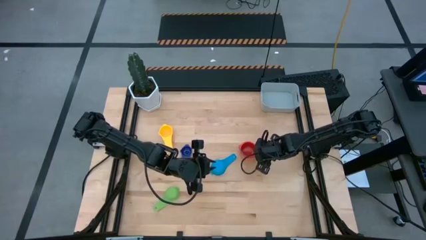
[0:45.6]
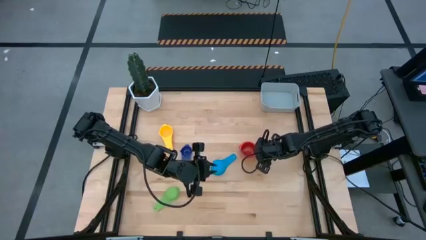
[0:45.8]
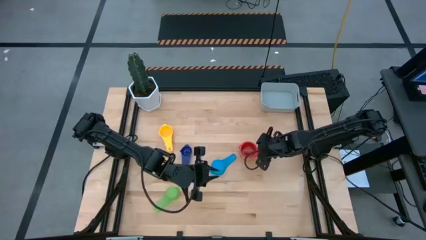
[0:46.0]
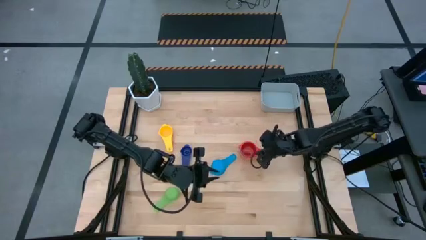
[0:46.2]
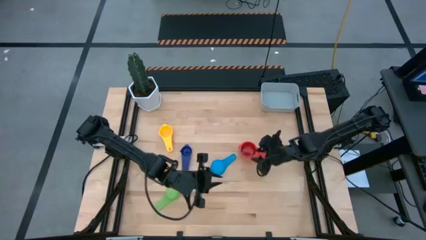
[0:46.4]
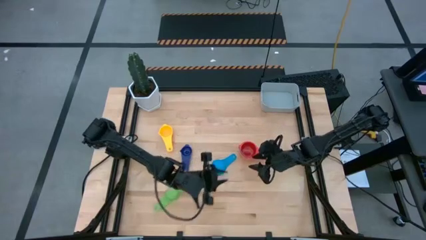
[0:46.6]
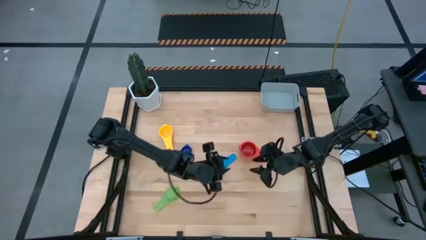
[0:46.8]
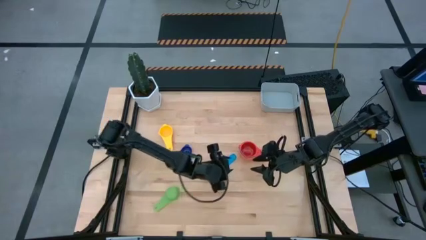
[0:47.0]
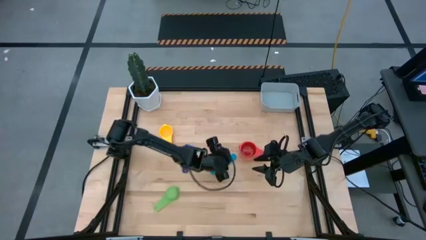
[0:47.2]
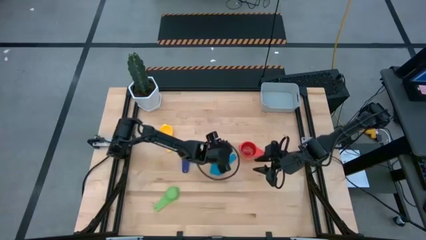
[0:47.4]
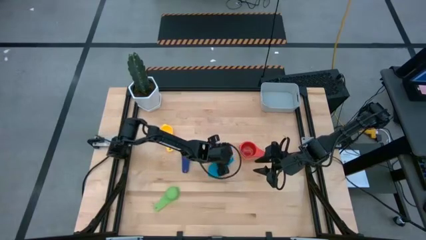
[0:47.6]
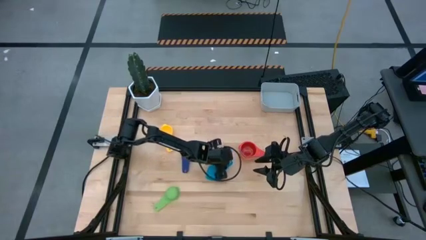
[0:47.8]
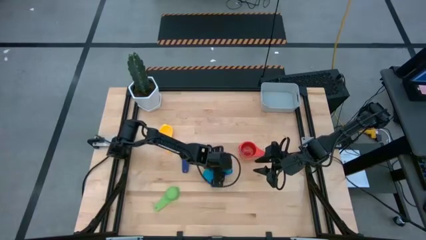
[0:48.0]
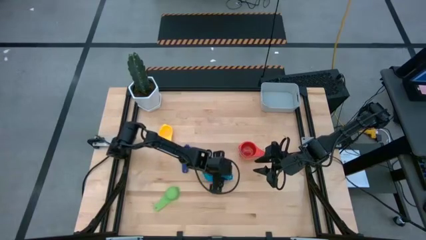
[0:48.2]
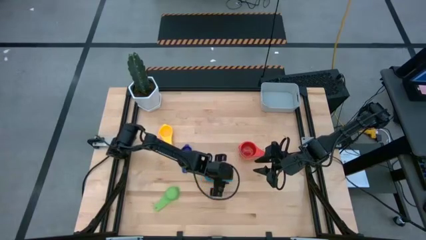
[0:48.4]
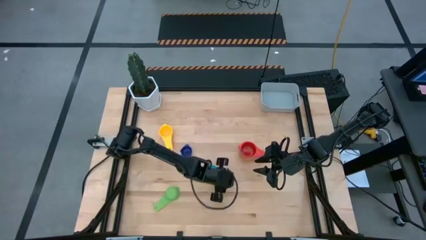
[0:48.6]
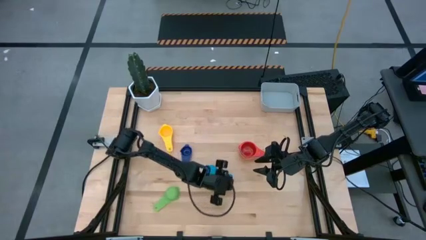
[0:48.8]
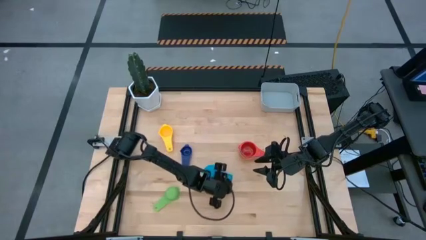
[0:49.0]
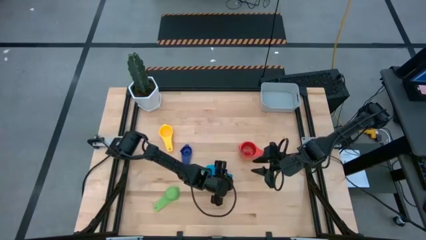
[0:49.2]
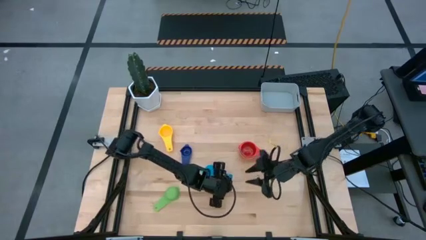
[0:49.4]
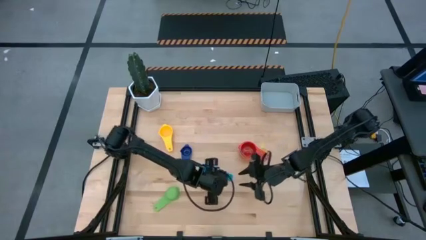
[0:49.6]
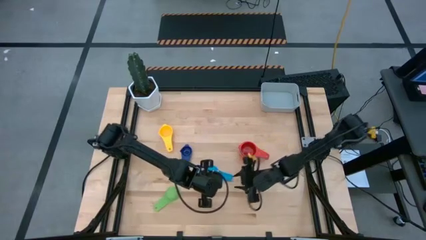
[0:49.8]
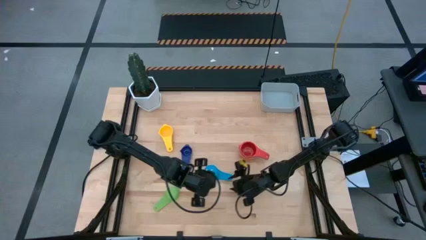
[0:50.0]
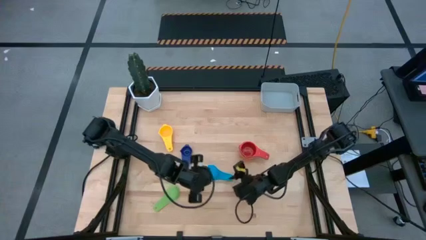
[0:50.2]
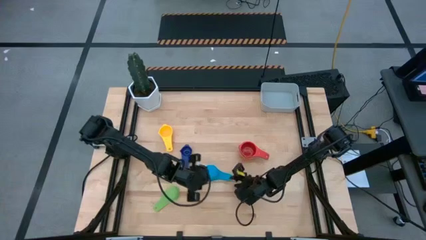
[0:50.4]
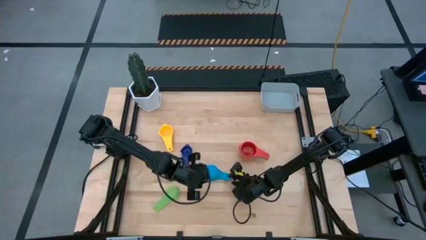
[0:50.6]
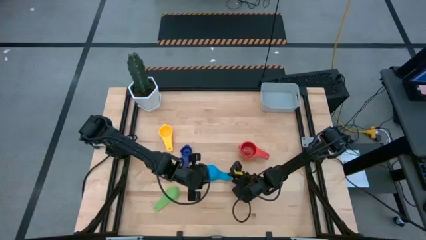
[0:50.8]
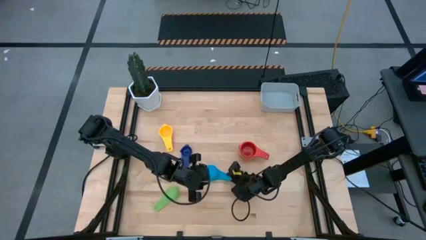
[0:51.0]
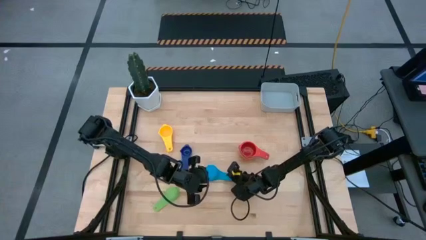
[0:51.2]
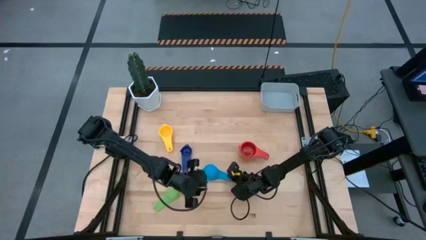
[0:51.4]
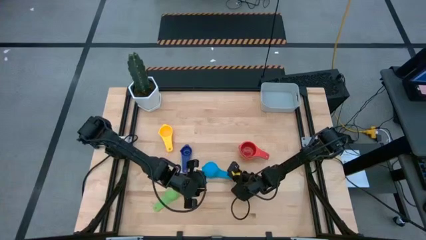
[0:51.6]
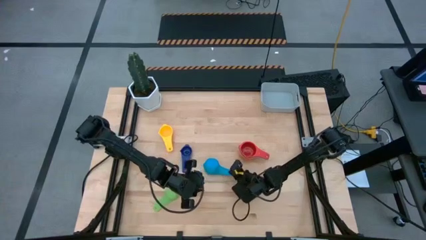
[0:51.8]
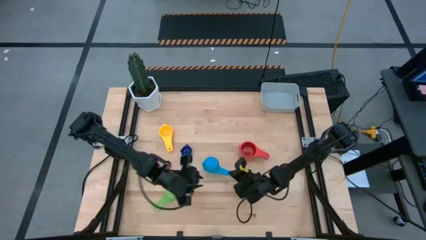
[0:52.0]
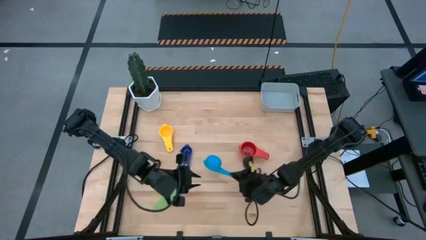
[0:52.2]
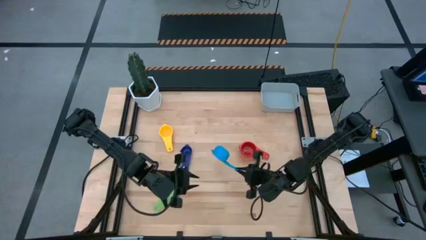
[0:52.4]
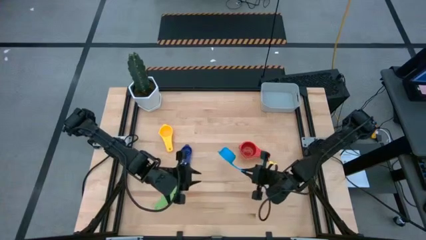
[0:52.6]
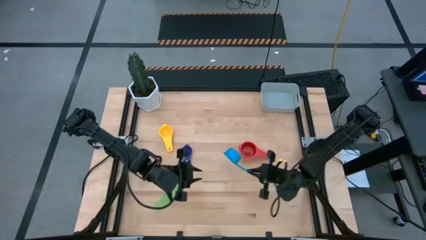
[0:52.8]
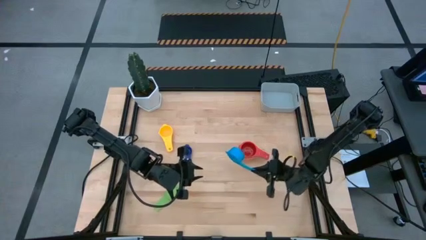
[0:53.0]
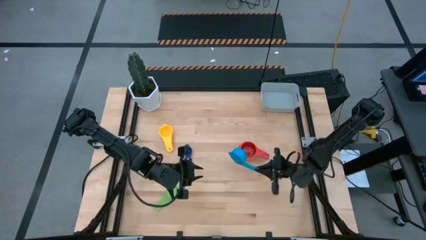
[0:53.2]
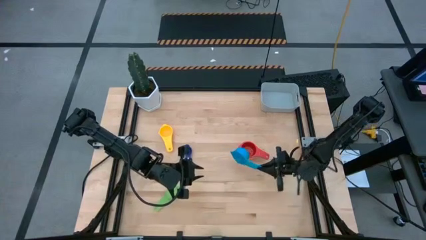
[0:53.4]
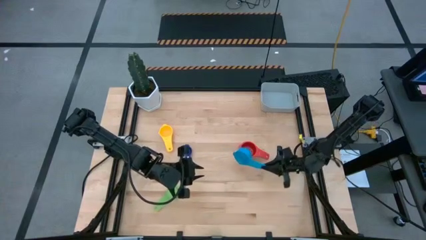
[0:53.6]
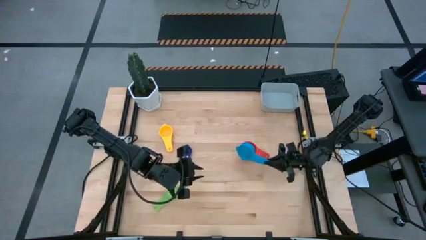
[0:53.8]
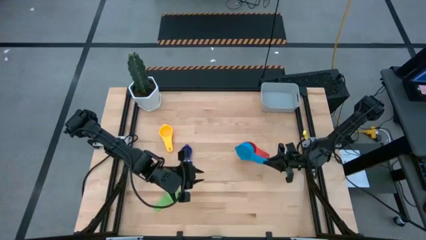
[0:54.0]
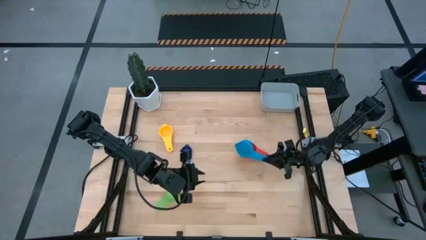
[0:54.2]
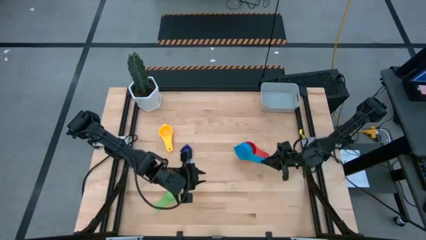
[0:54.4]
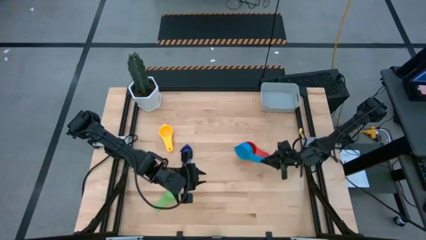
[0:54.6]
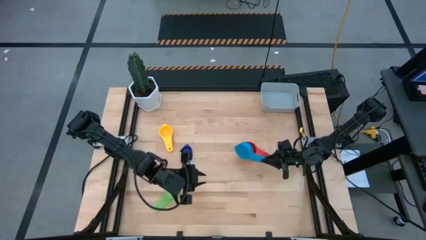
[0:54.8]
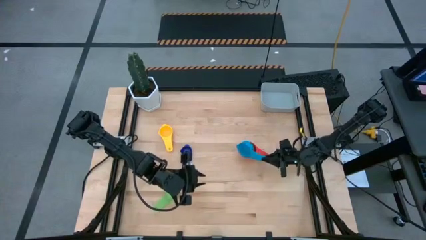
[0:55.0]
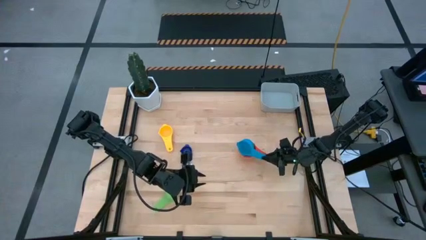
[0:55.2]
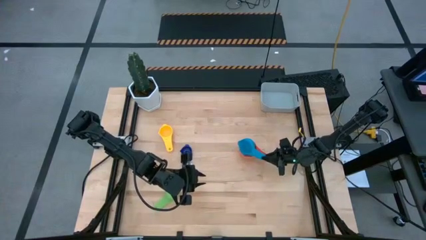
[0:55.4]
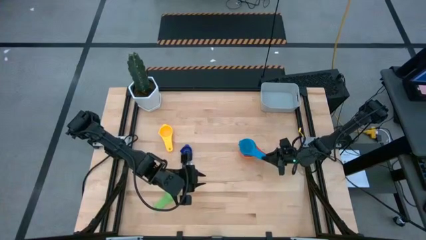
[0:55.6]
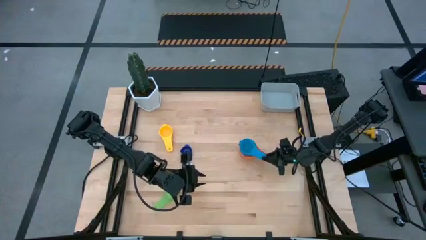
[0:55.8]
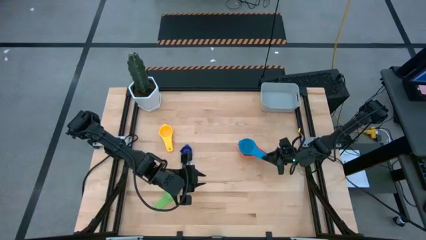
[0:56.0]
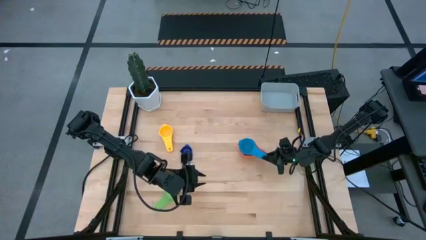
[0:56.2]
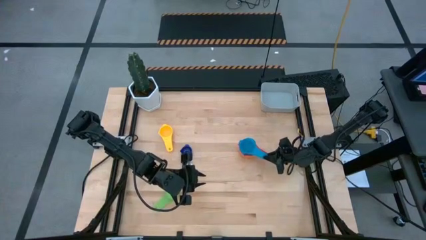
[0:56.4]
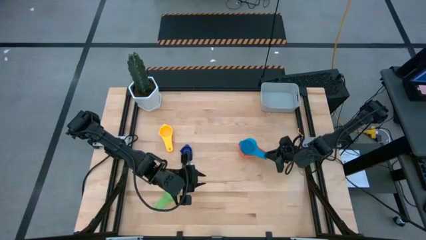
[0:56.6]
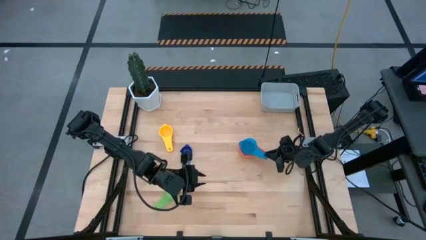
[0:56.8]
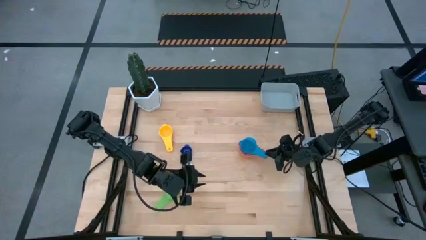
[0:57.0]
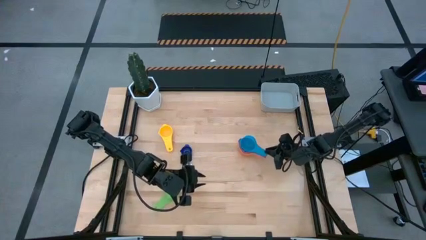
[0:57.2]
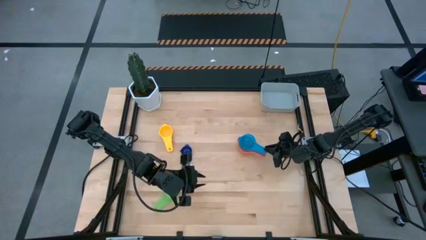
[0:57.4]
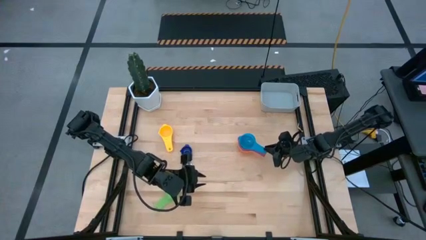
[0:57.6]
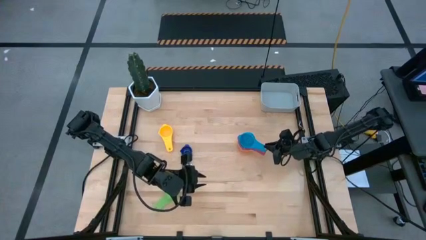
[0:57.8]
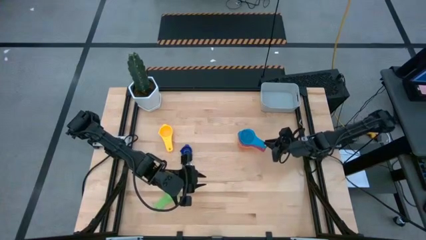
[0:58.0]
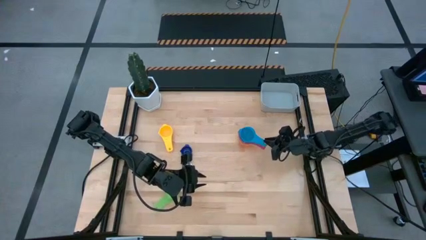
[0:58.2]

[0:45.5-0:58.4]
Task: Nest measuring cups in basket
Stack the light blue measuring cup on top of the red measuring cup
